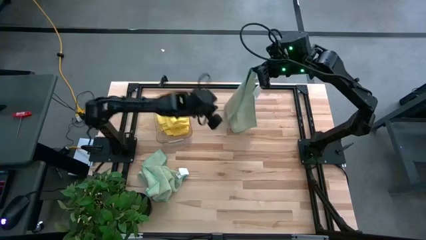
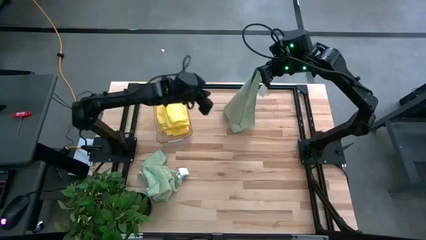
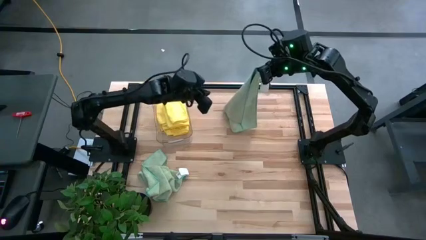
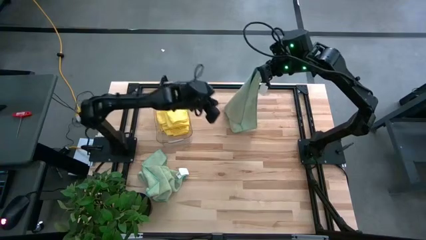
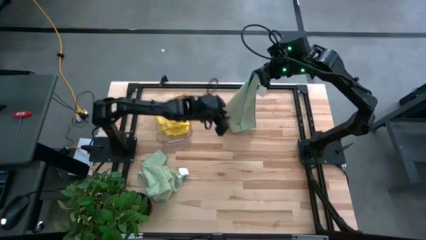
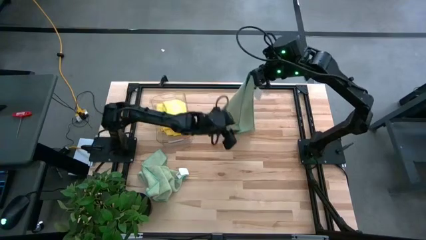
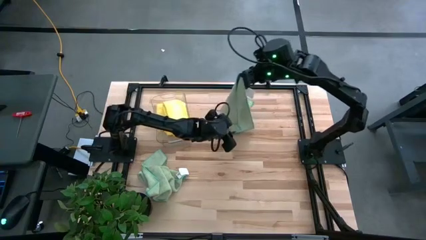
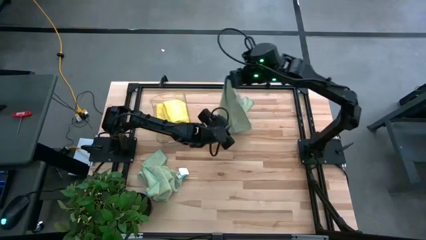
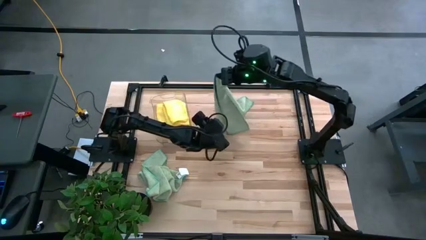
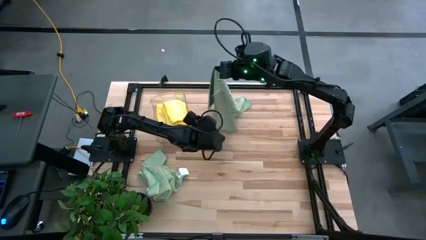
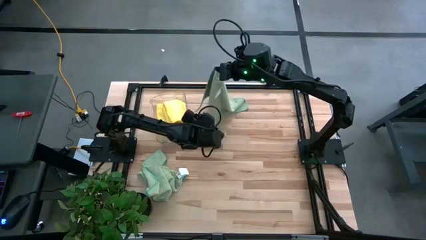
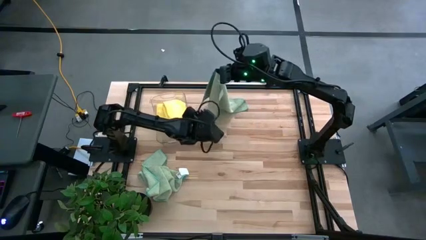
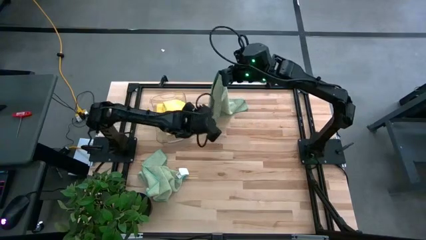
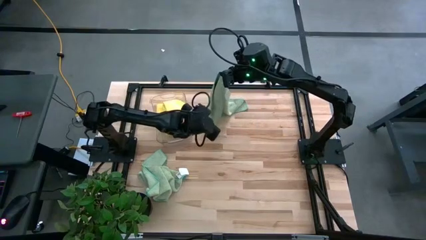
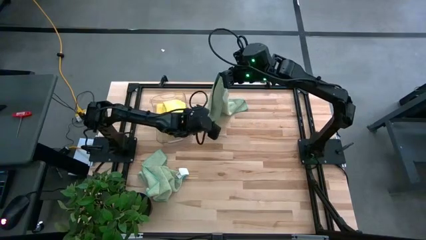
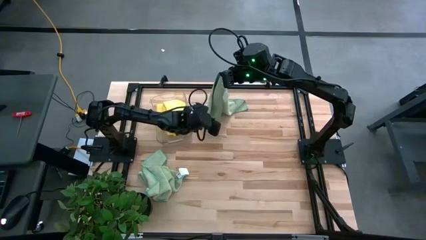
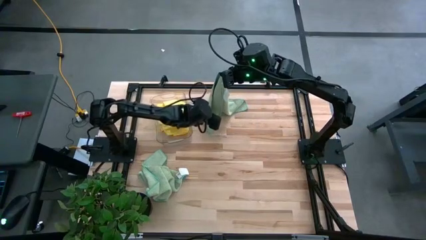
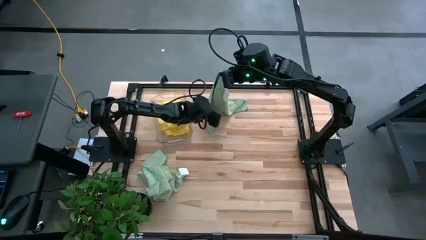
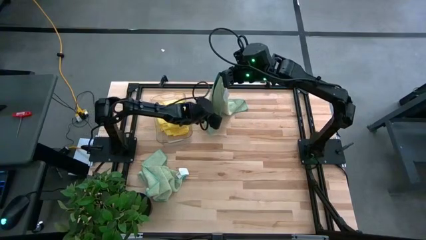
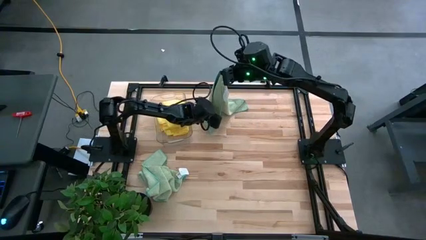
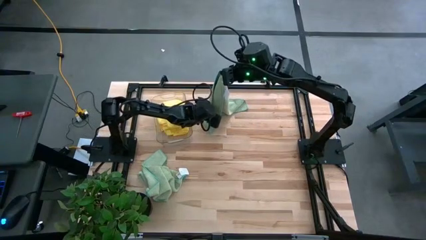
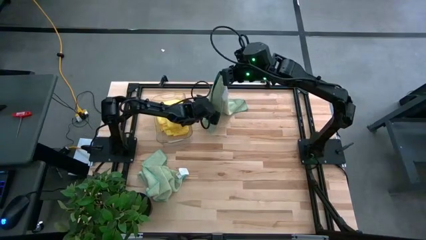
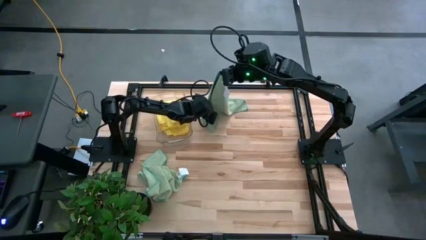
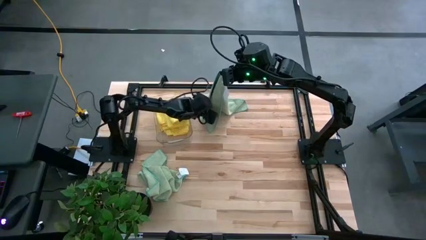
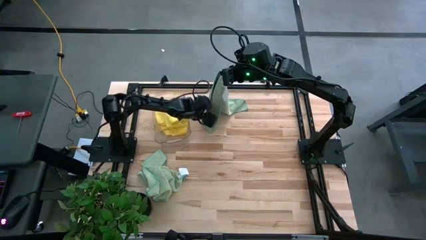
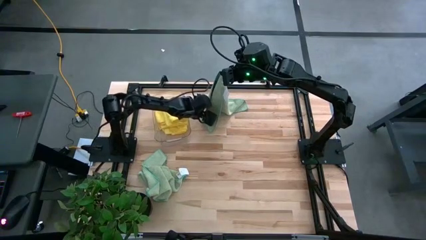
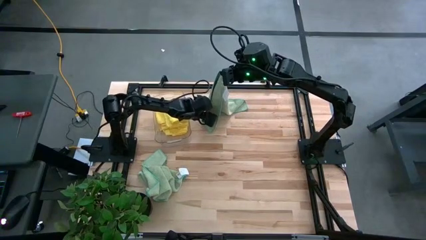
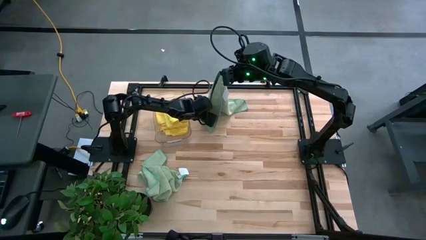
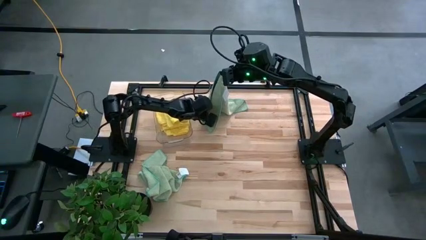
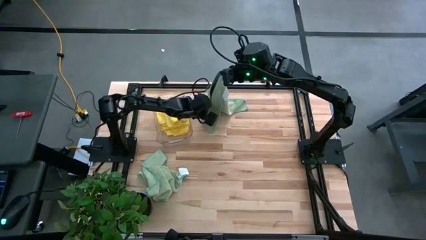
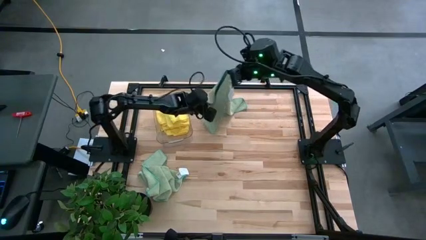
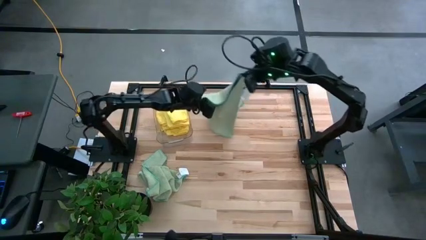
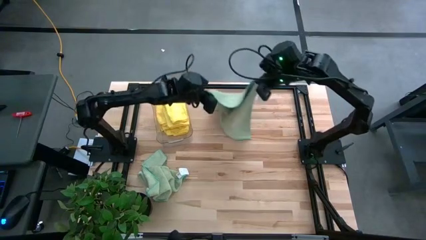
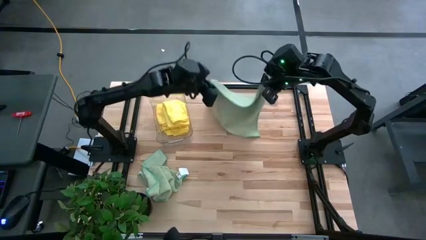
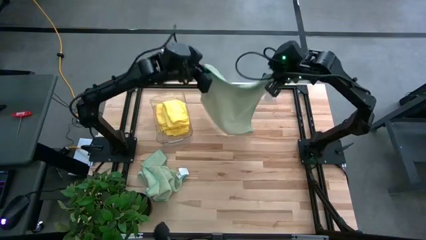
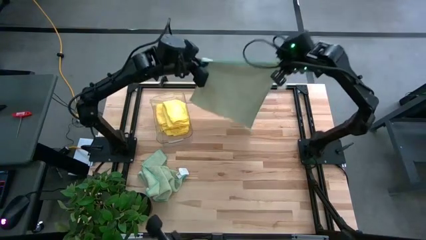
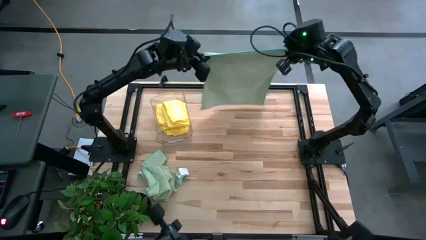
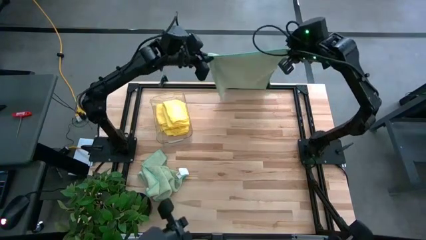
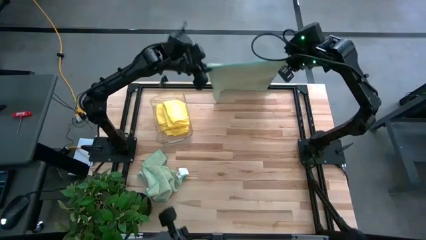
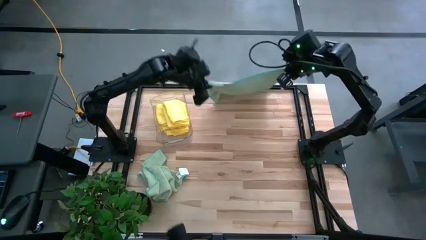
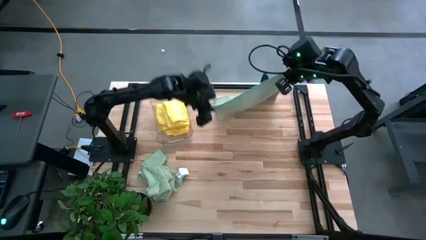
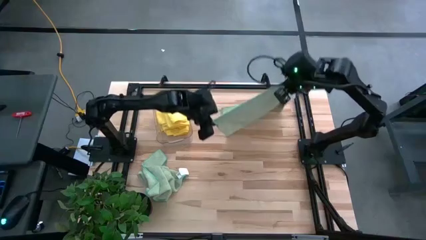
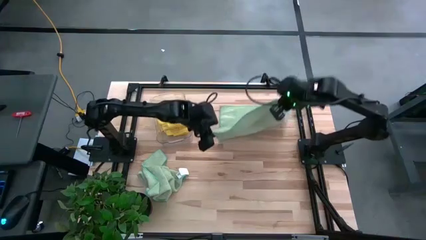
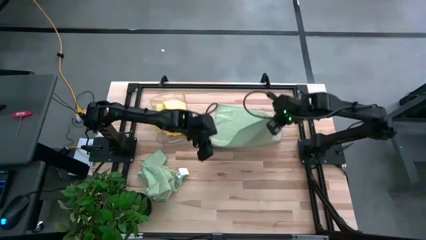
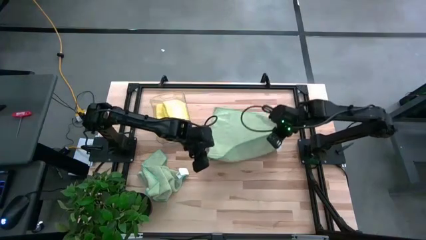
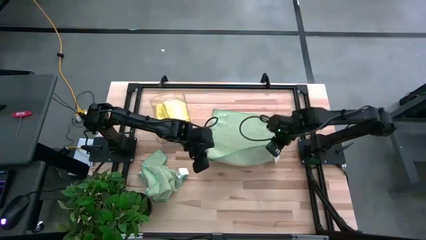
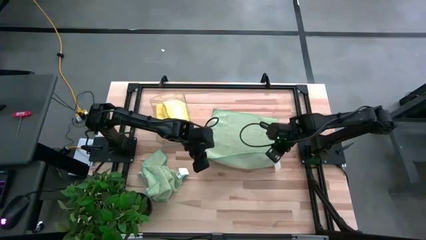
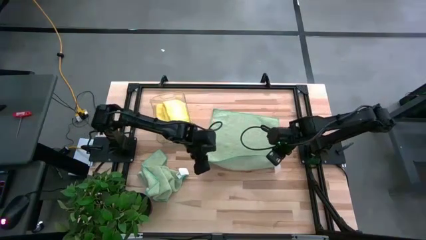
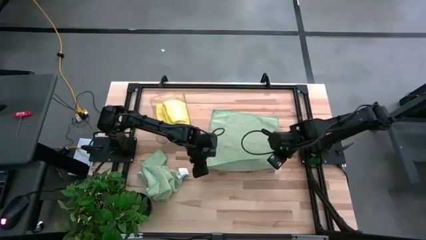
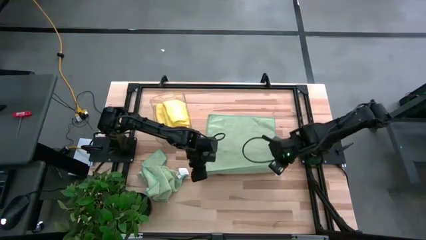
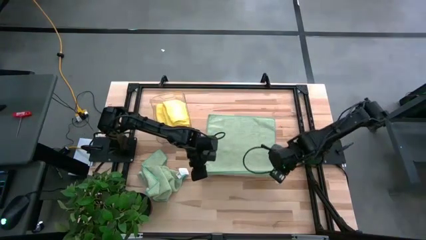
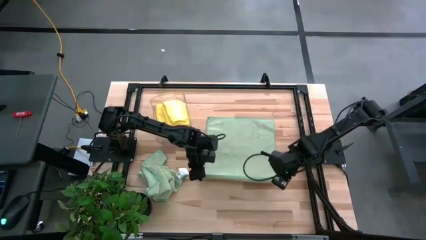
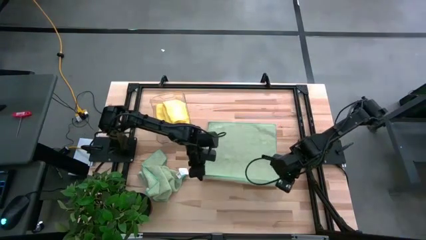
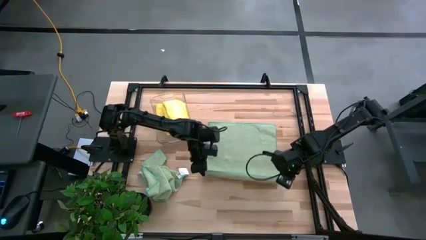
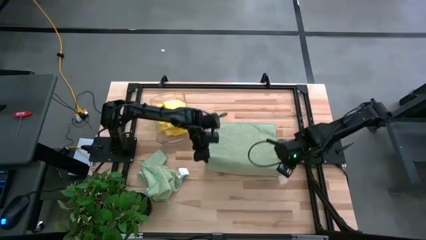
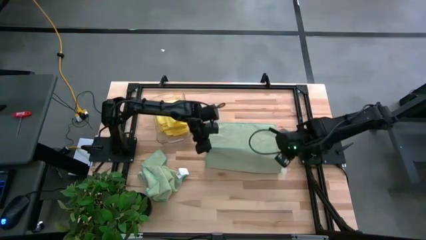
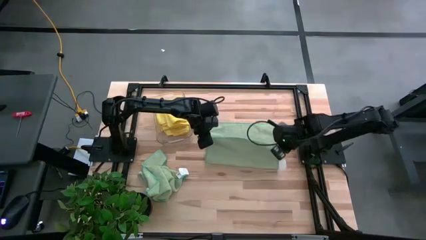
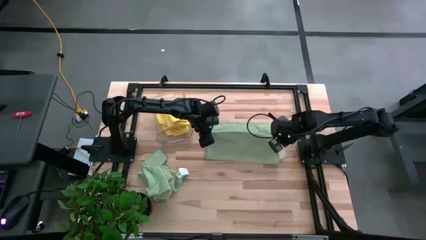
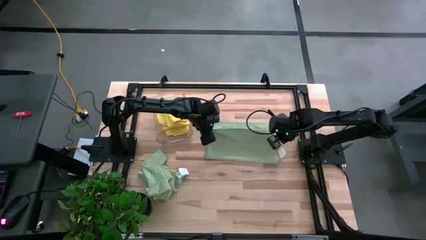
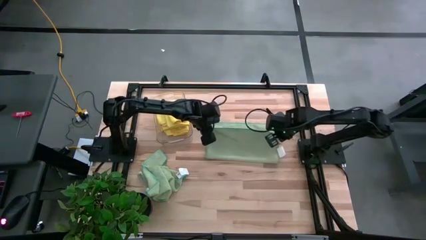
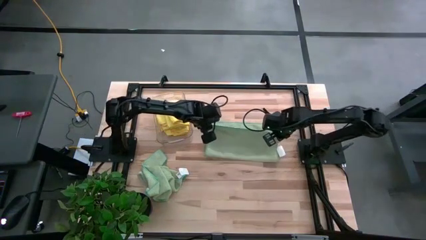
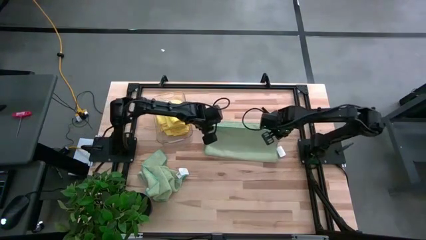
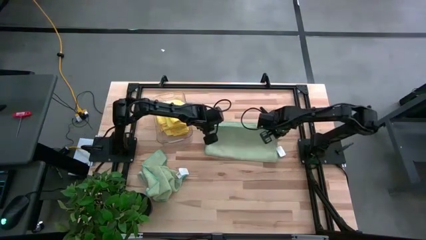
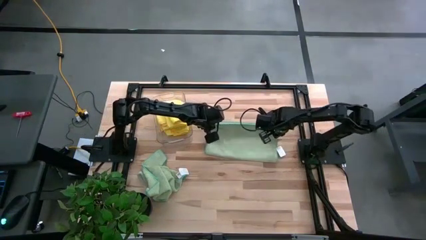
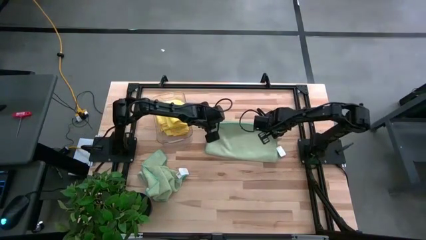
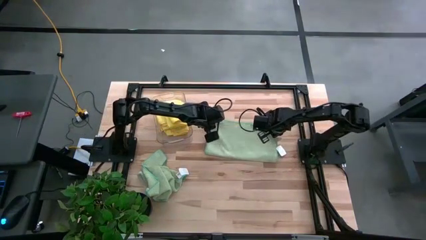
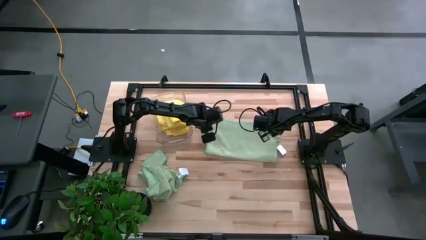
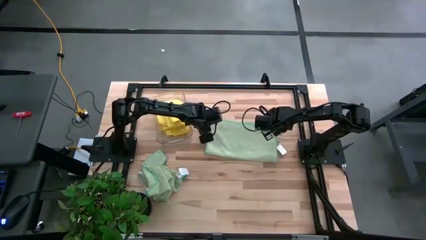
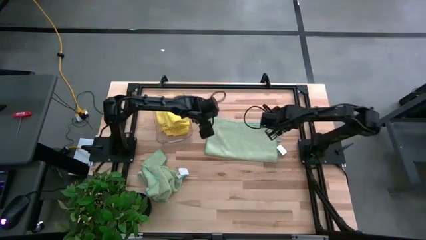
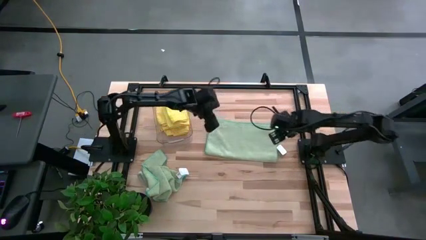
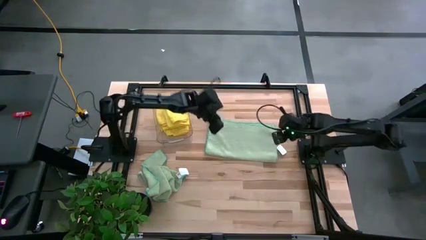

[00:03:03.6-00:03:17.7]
Task: Fold microfiber towels
Fold the right green towel
